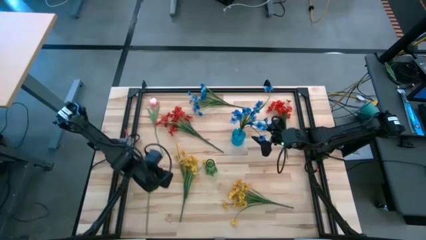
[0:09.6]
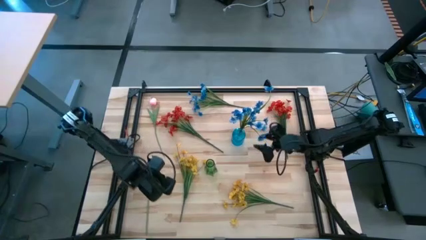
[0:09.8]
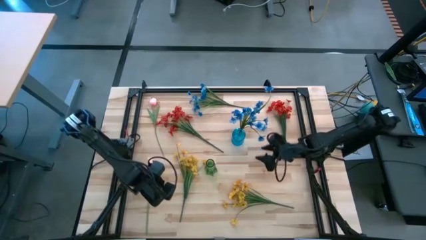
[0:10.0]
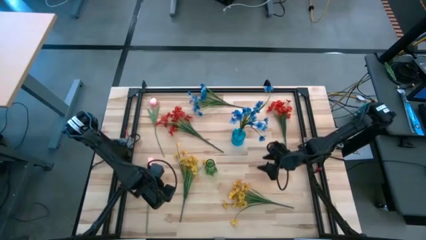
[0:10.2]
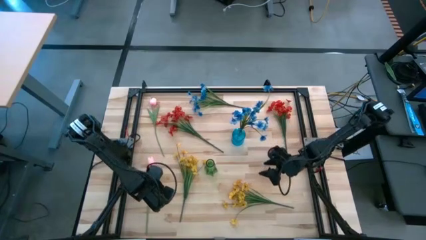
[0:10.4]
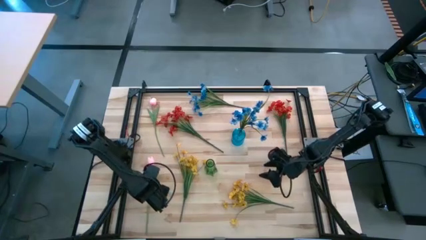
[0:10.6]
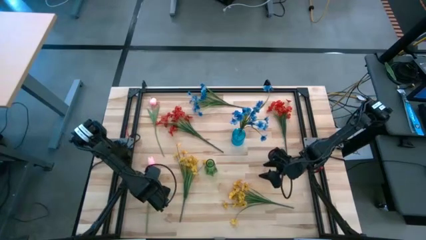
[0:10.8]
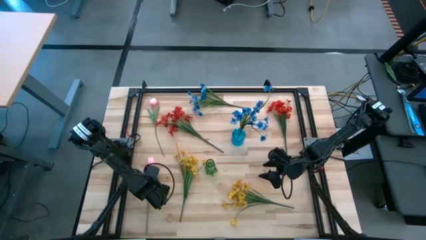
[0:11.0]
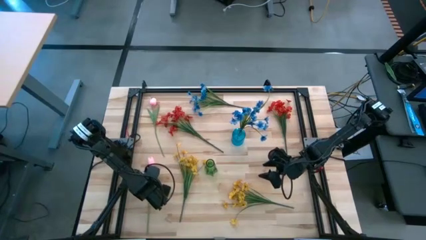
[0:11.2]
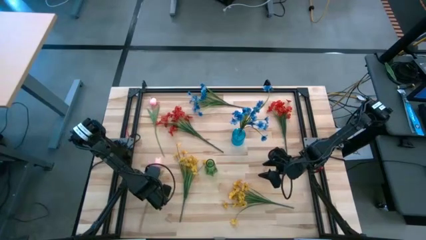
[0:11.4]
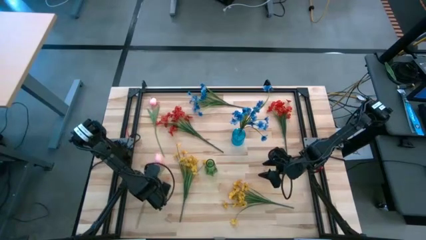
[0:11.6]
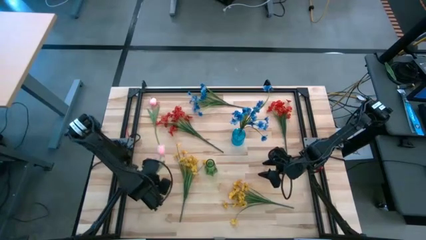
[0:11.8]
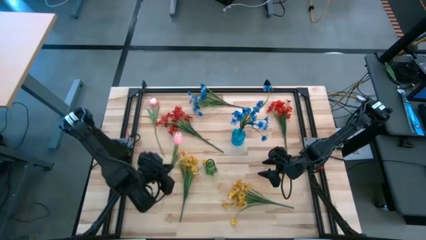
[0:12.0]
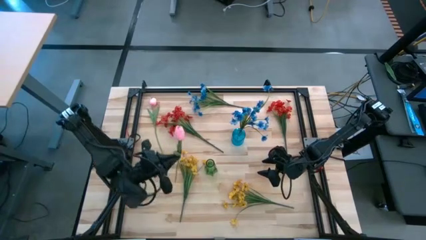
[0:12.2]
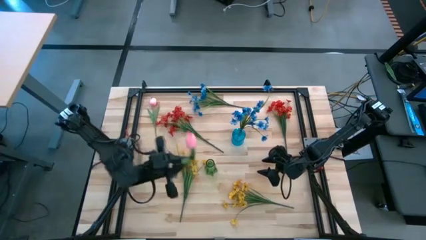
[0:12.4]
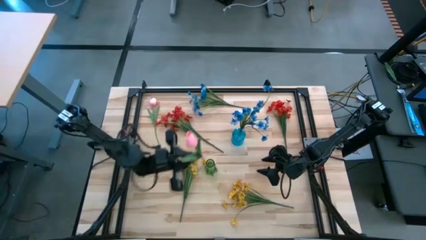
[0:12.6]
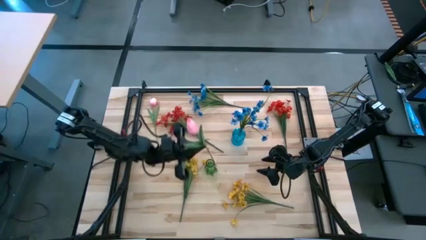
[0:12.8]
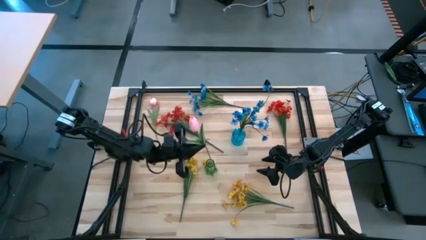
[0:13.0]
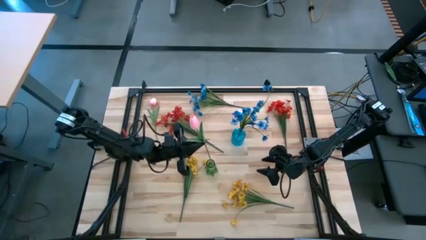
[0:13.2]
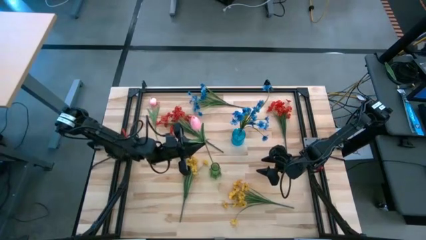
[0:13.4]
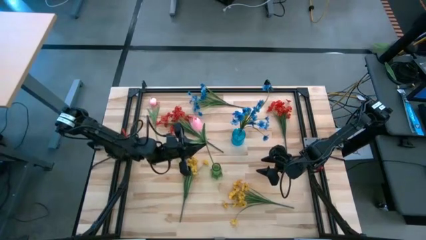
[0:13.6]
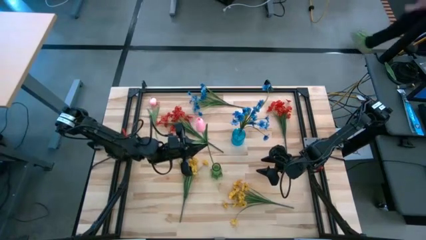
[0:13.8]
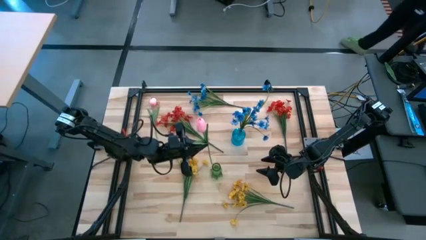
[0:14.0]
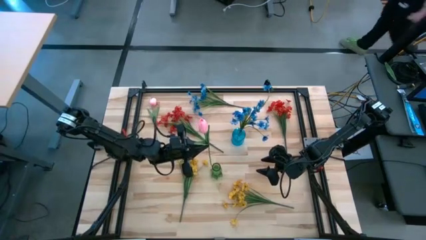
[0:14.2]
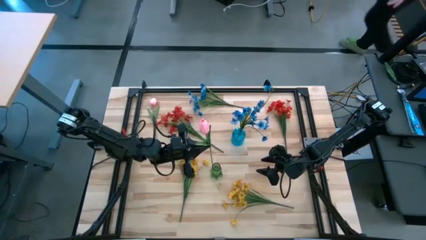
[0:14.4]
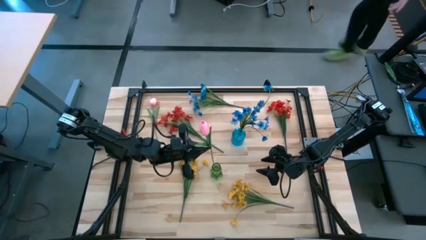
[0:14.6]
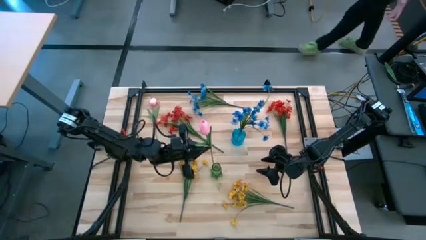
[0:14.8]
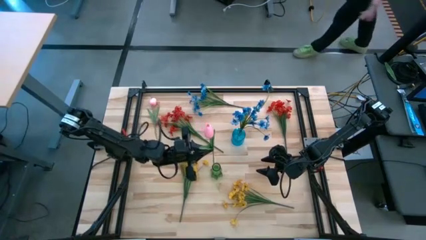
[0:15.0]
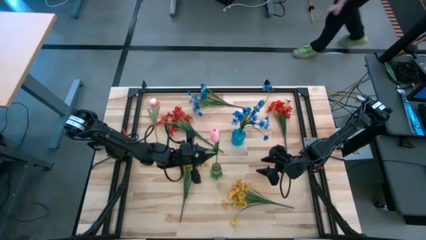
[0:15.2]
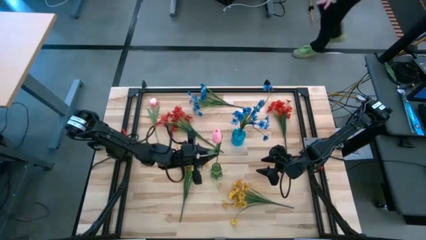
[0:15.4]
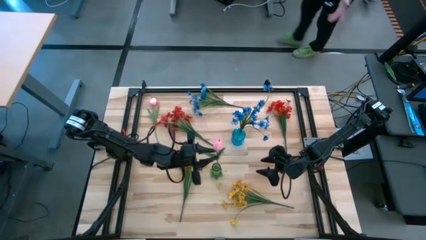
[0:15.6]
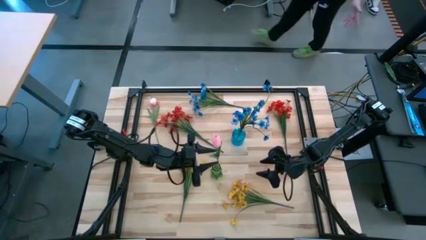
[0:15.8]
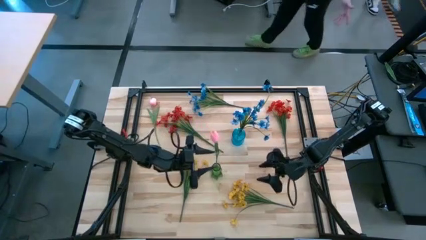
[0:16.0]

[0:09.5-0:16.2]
Task: Sort flowers into vase by color
Put the bottom pink tulip into the green flower vase

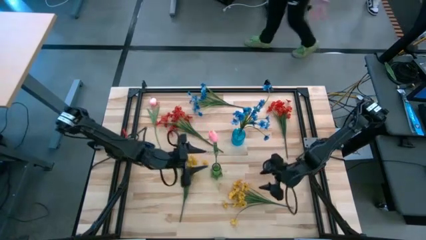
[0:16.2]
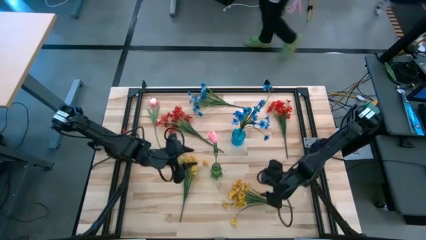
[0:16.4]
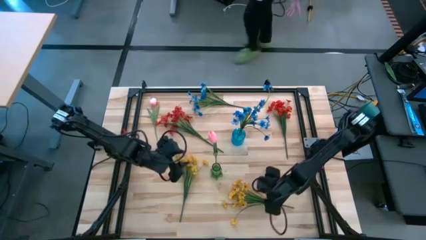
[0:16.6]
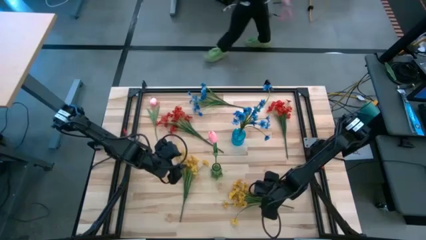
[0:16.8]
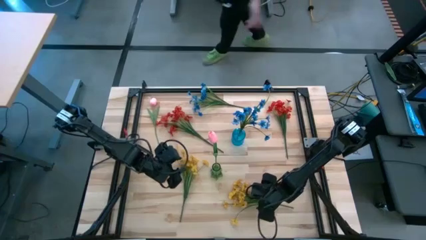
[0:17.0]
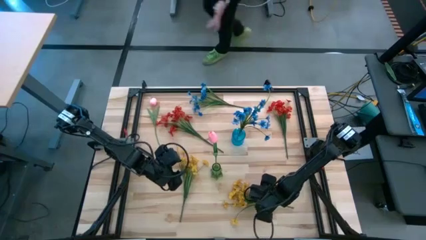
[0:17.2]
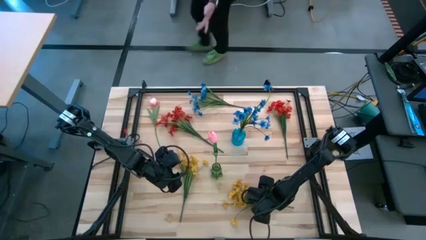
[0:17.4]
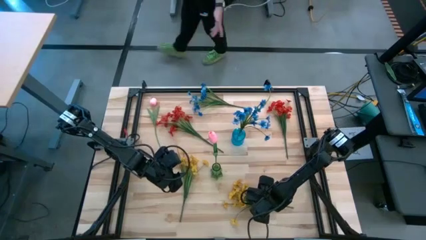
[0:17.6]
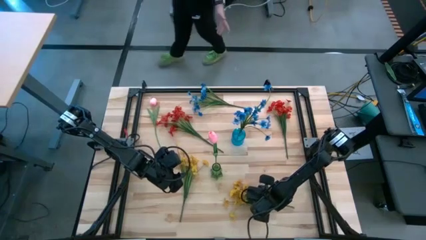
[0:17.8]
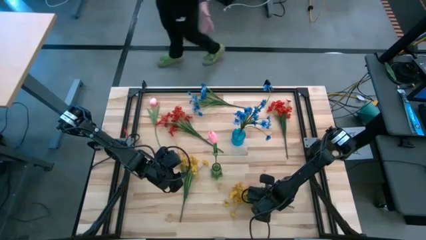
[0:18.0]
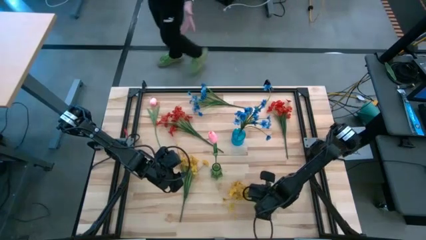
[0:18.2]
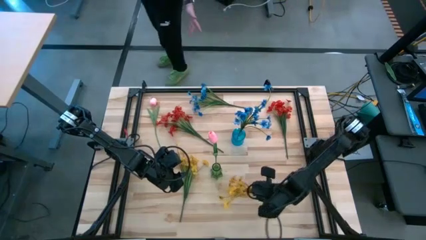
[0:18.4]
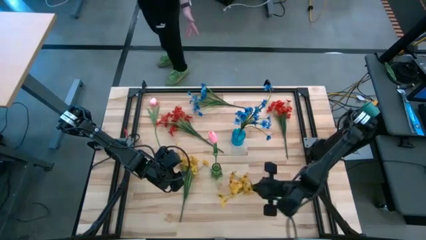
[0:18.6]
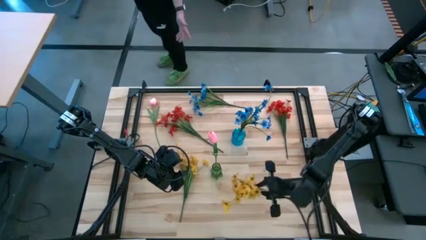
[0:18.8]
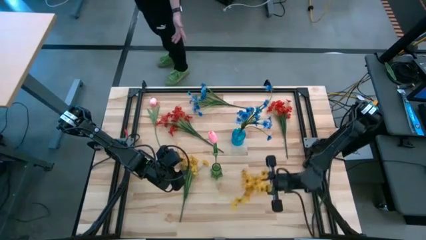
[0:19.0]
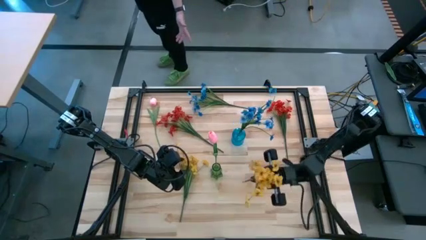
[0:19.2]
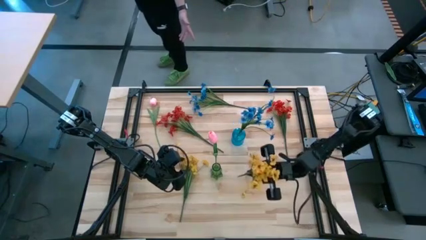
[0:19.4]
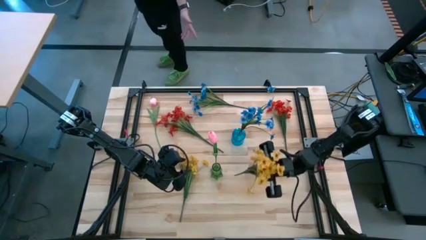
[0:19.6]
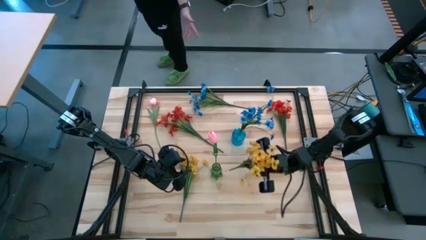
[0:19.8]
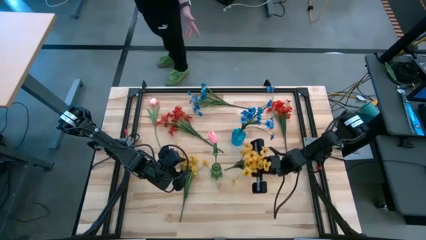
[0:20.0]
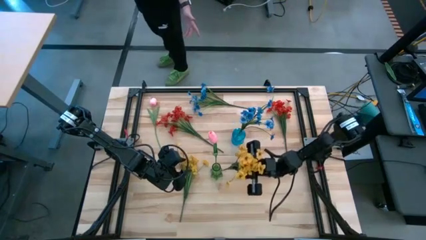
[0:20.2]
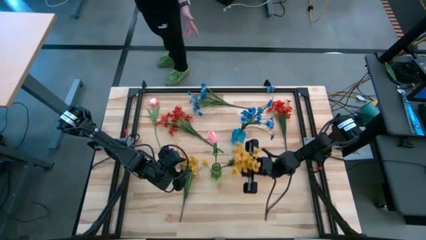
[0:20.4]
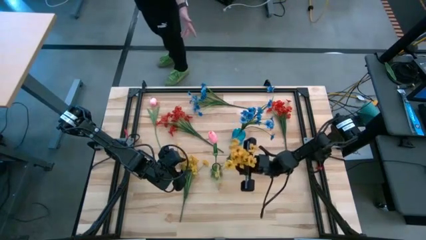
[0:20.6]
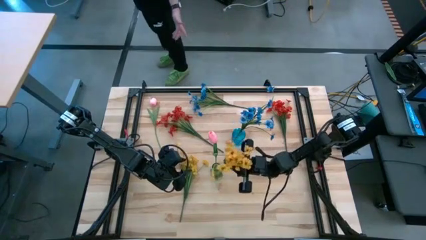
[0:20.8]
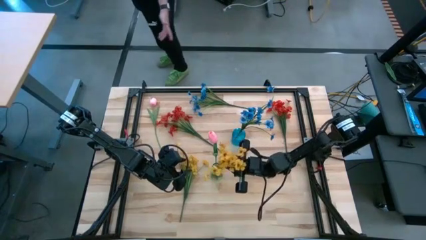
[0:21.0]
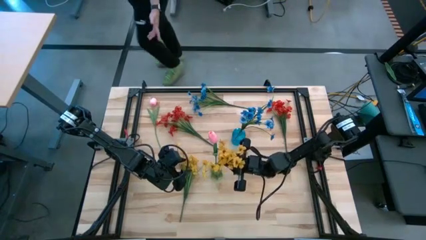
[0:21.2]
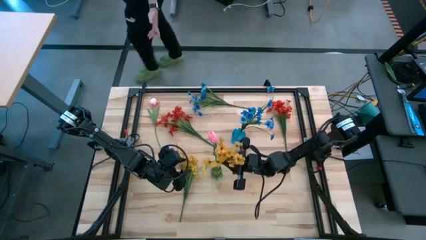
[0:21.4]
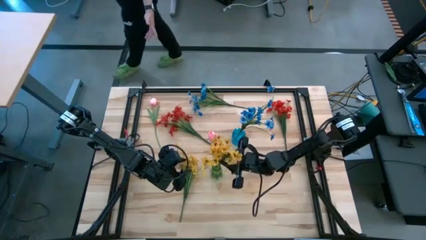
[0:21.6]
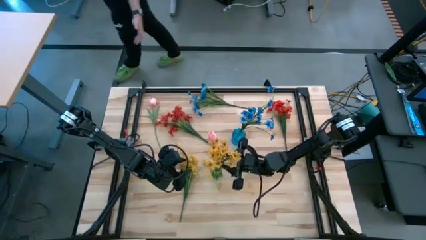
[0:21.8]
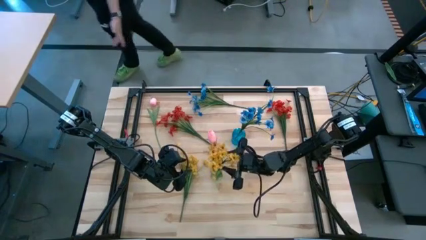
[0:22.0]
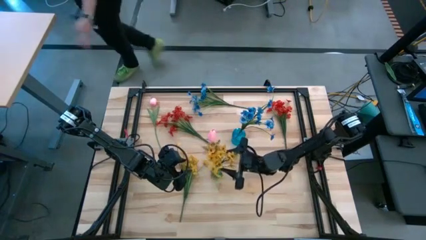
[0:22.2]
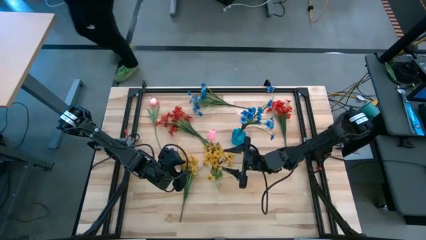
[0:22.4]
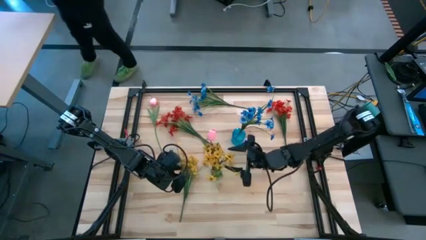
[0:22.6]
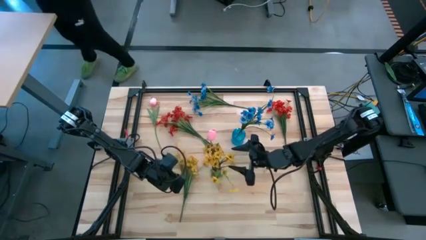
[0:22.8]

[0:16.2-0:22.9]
Put the right yellow flowers into the green flower vase

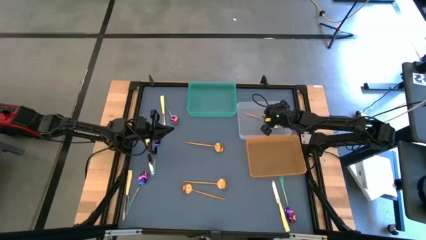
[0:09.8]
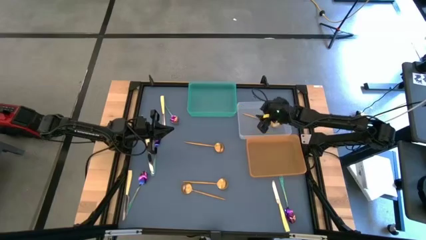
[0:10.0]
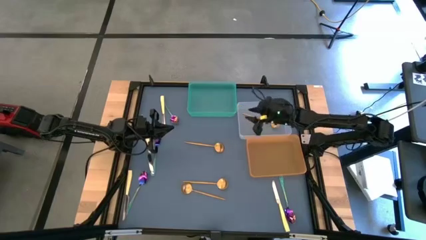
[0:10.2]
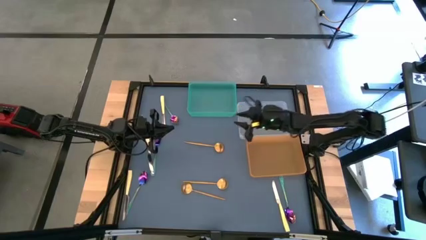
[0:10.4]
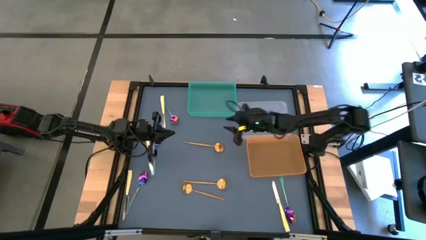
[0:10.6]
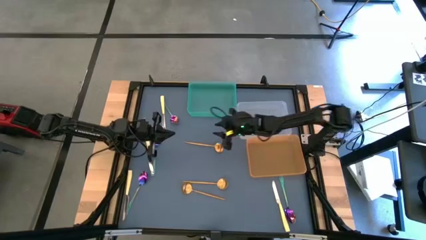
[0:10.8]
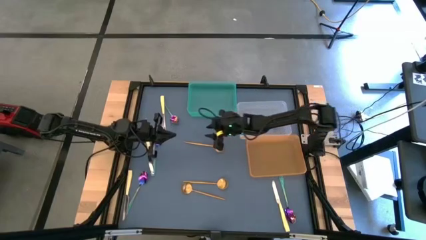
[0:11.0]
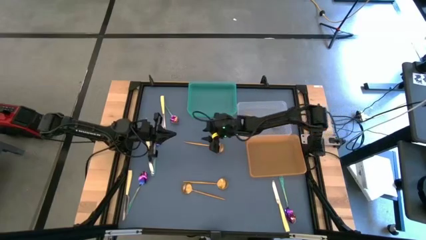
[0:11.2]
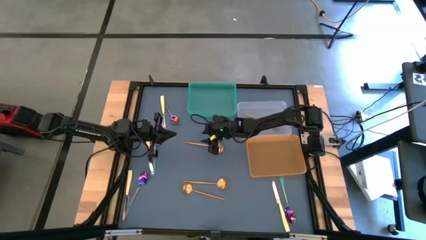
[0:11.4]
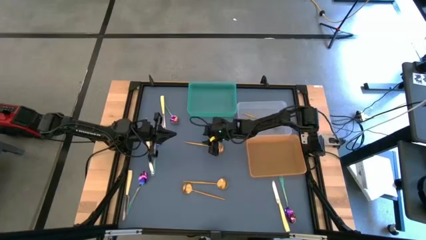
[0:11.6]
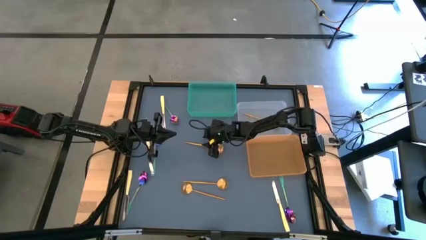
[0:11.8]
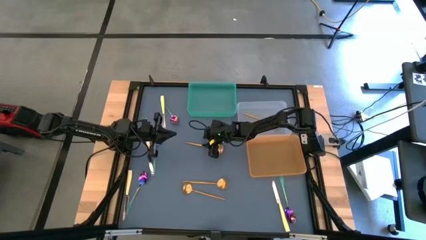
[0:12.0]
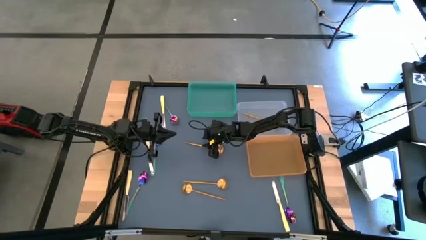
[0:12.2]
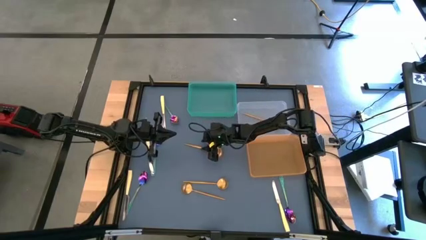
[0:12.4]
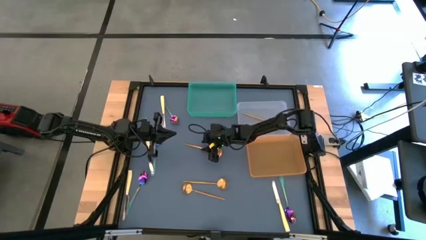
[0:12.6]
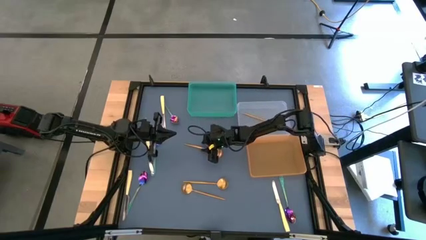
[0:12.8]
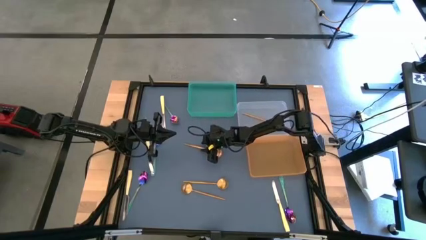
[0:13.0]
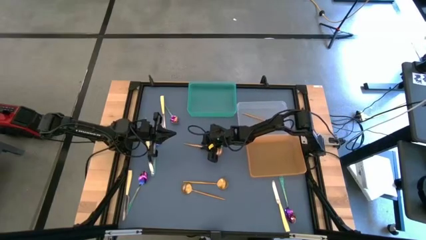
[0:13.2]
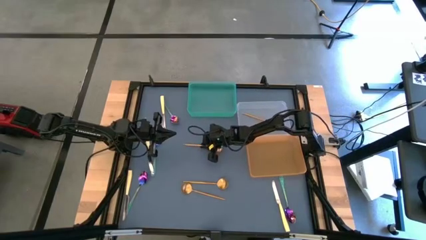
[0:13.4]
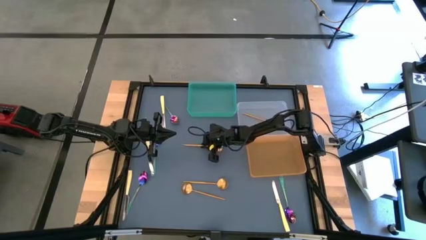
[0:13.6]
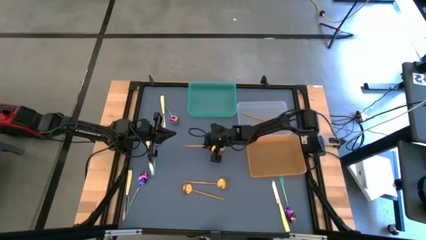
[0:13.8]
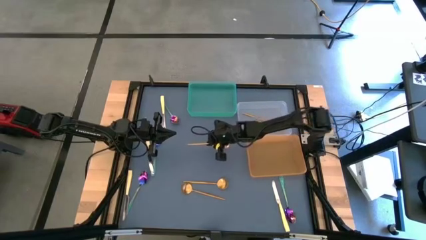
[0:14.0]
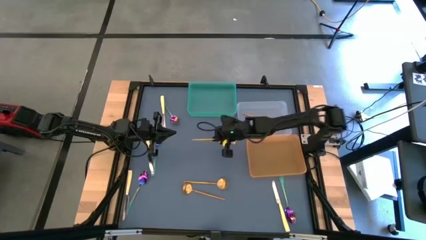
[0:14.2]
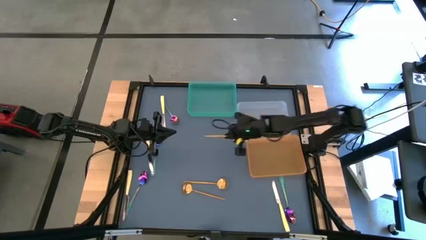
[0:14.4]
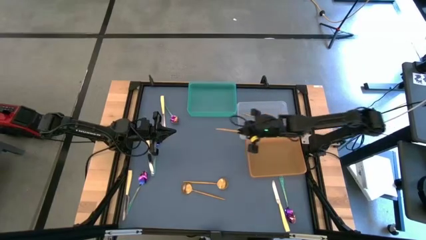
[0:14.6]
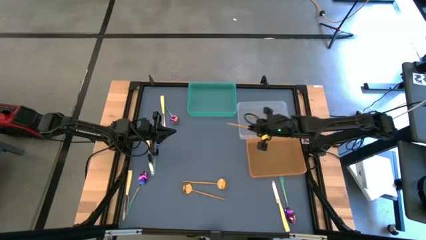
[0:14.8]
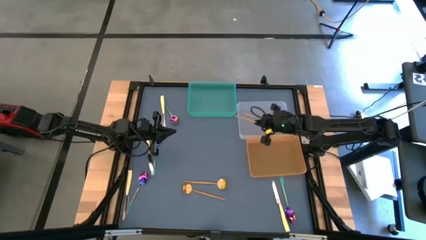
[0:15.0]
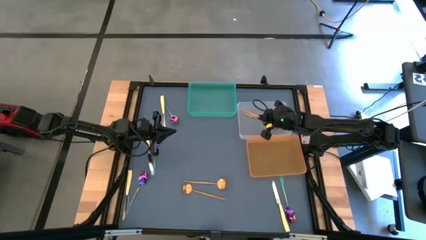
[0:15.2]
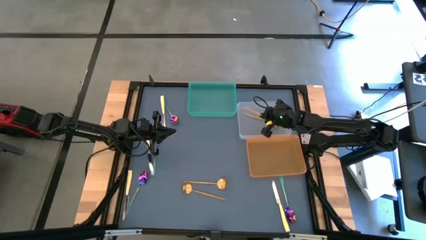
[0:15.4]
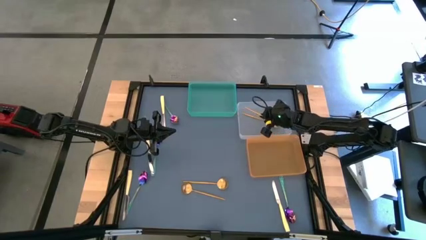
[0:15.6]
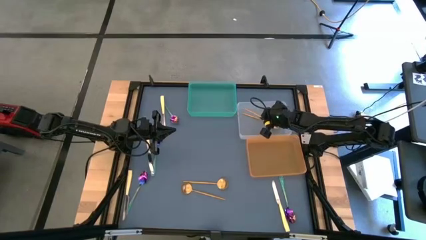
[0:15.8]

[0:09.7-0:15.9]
Task: Sort silverware by color (type)
Put the gold spoon into the transparent bin
